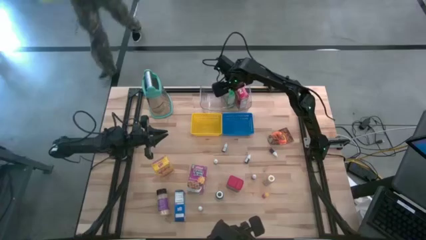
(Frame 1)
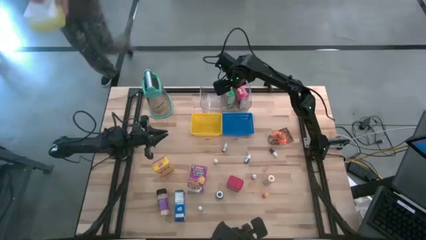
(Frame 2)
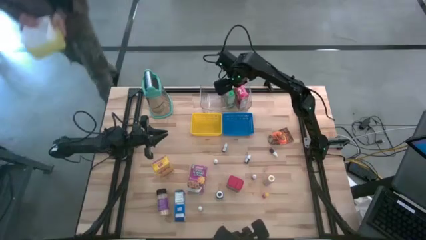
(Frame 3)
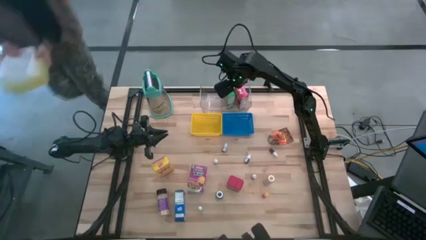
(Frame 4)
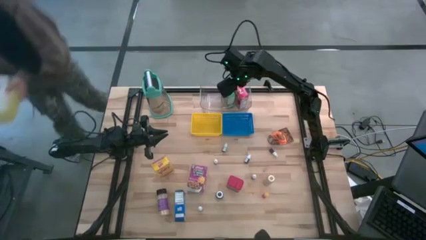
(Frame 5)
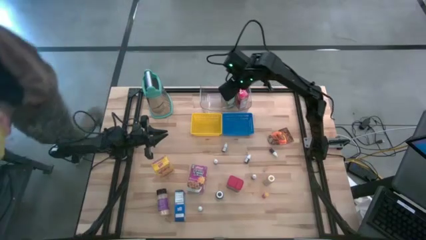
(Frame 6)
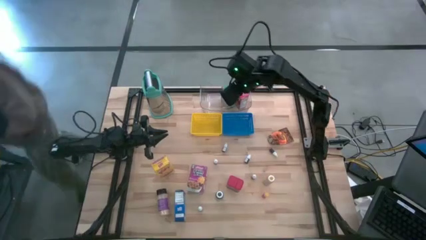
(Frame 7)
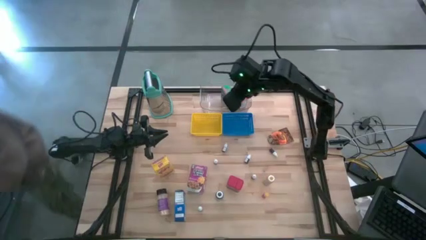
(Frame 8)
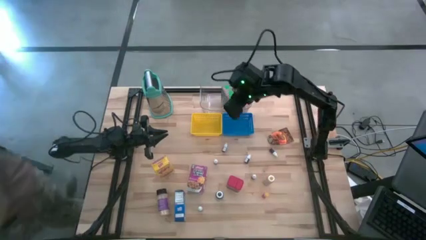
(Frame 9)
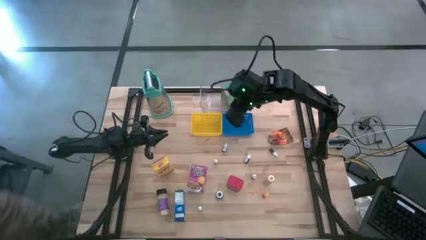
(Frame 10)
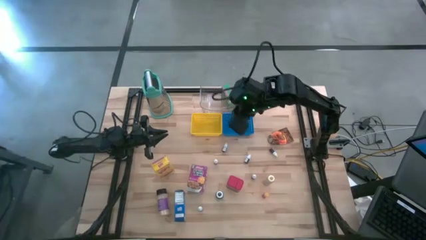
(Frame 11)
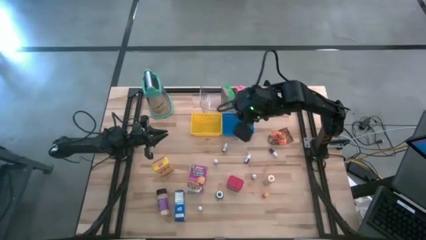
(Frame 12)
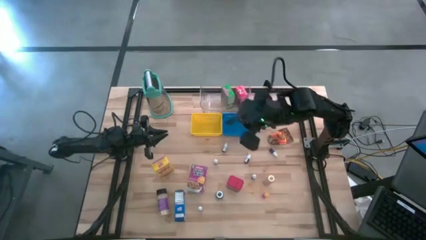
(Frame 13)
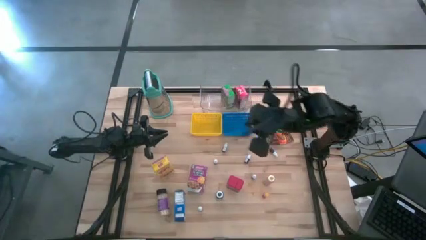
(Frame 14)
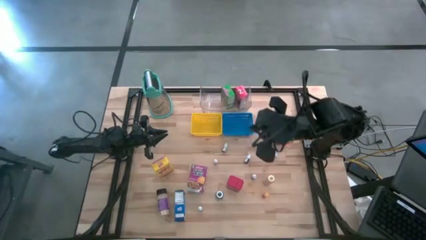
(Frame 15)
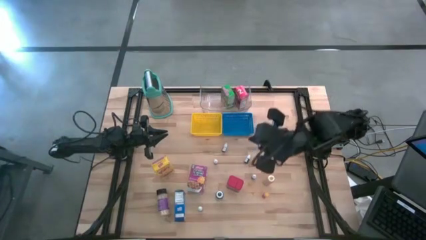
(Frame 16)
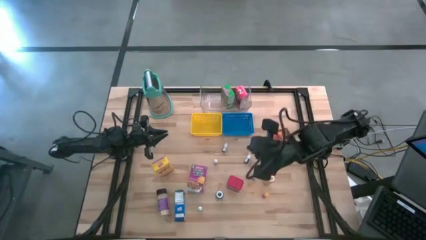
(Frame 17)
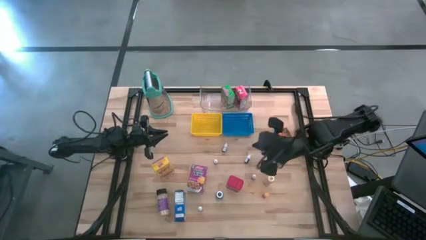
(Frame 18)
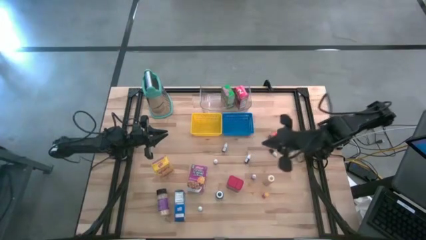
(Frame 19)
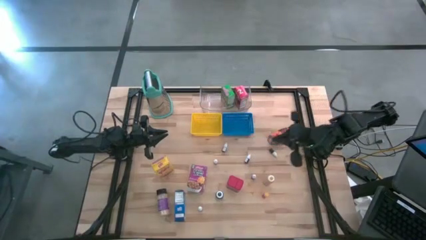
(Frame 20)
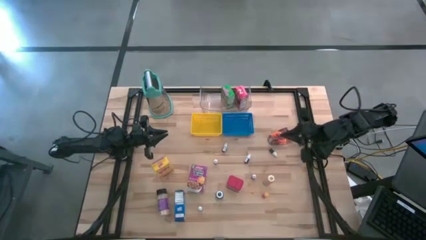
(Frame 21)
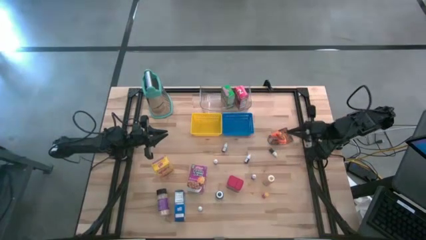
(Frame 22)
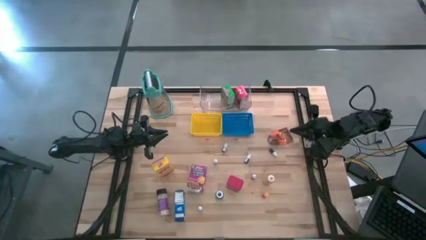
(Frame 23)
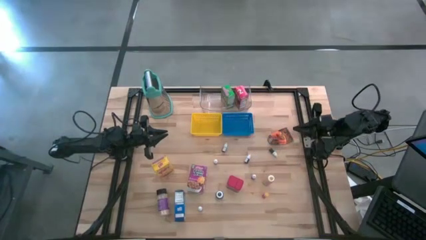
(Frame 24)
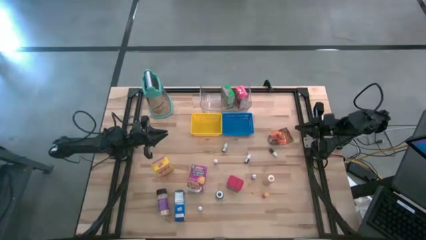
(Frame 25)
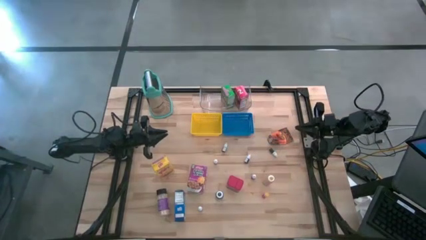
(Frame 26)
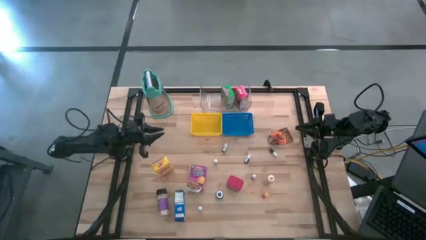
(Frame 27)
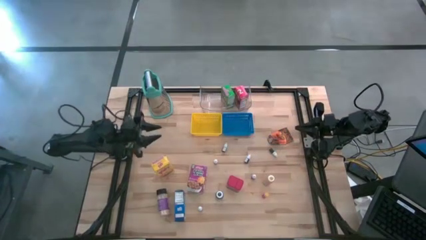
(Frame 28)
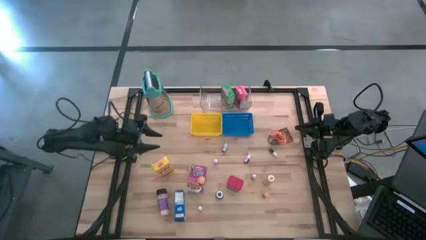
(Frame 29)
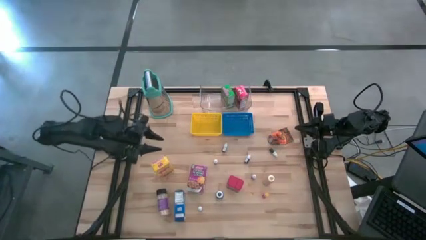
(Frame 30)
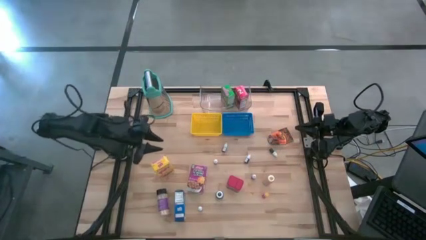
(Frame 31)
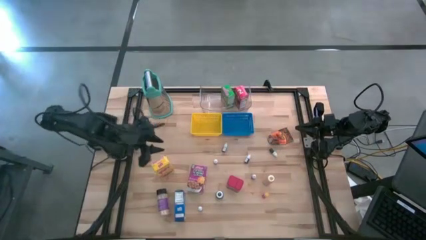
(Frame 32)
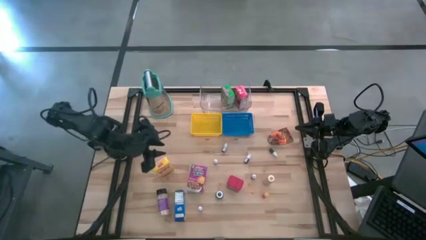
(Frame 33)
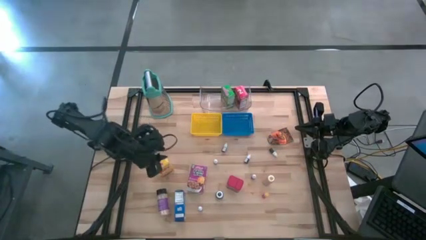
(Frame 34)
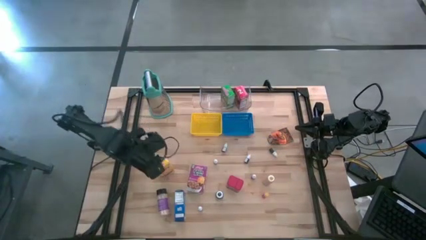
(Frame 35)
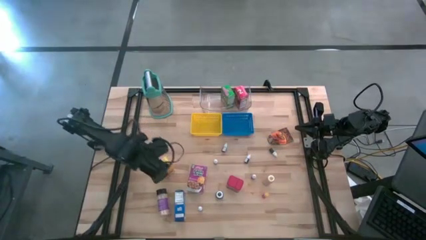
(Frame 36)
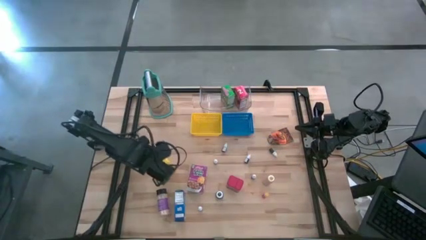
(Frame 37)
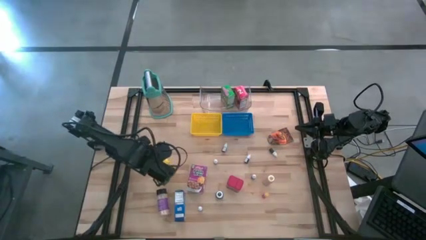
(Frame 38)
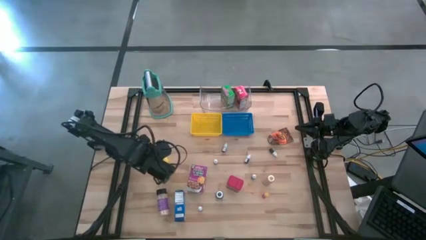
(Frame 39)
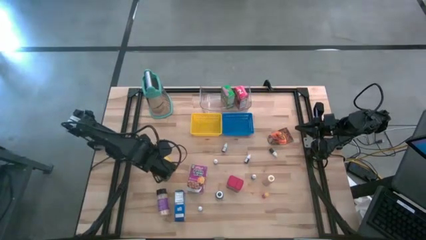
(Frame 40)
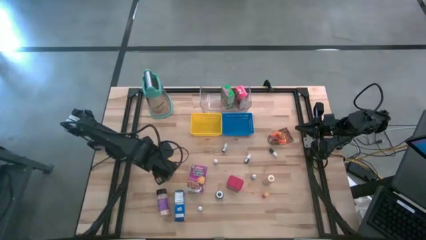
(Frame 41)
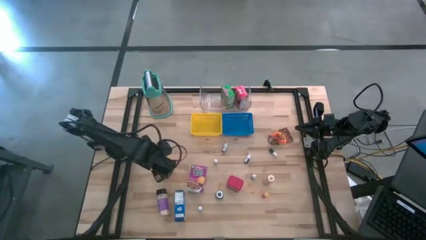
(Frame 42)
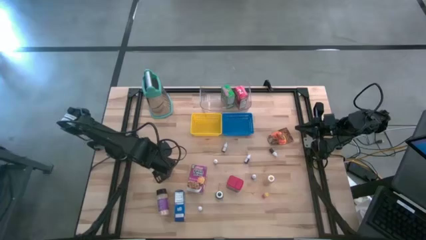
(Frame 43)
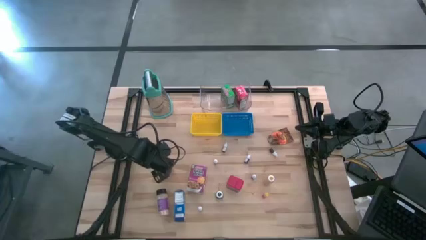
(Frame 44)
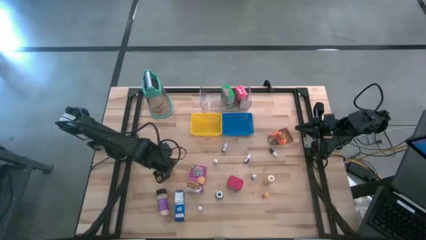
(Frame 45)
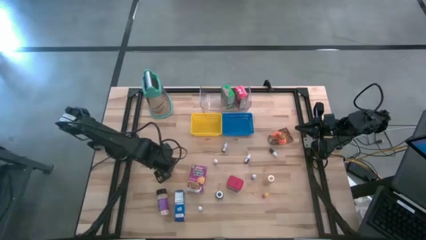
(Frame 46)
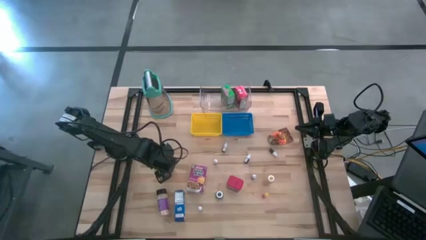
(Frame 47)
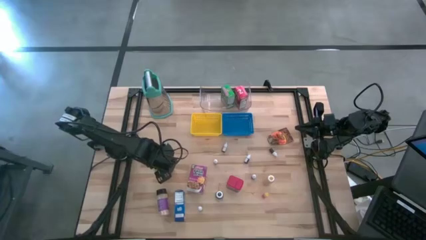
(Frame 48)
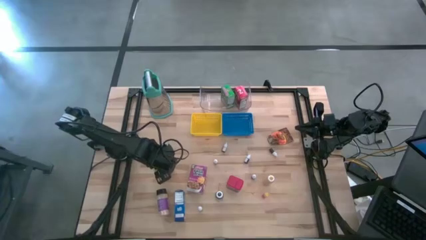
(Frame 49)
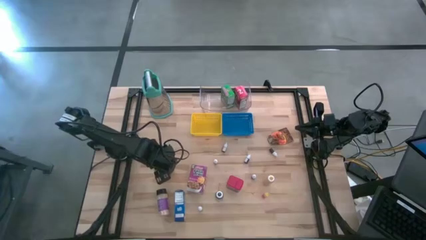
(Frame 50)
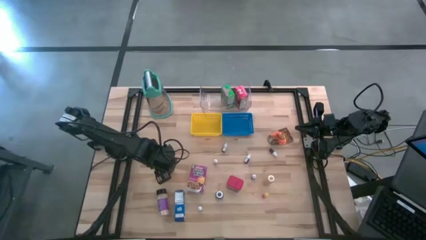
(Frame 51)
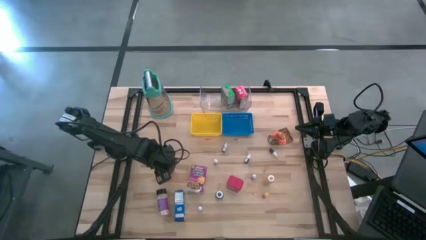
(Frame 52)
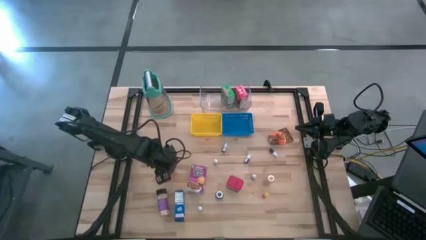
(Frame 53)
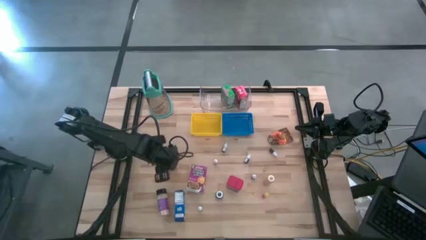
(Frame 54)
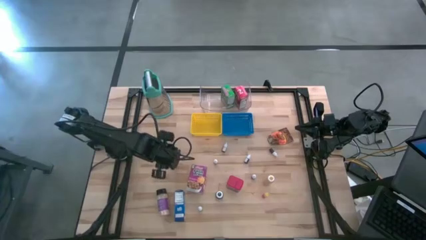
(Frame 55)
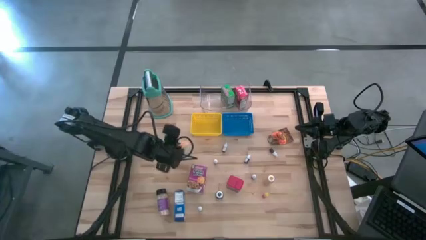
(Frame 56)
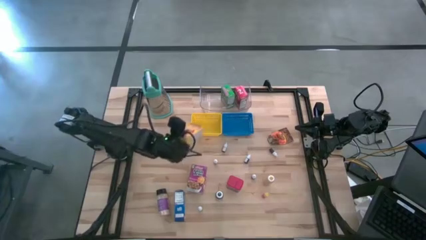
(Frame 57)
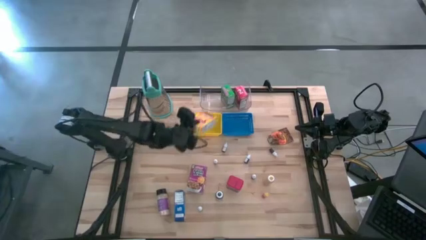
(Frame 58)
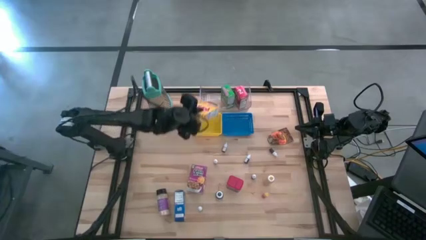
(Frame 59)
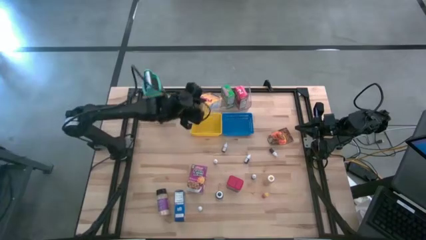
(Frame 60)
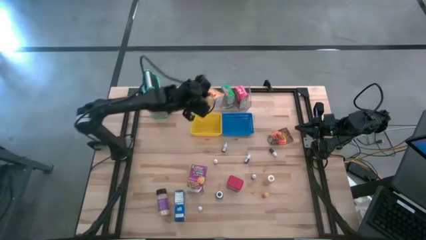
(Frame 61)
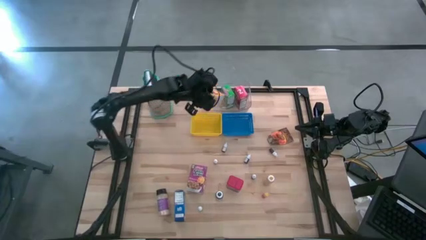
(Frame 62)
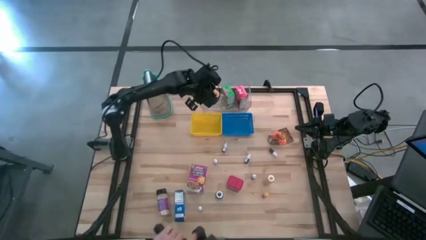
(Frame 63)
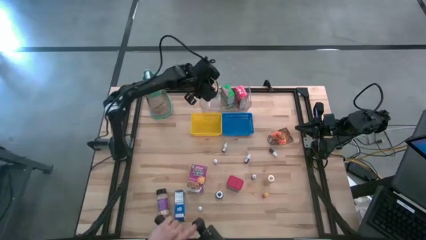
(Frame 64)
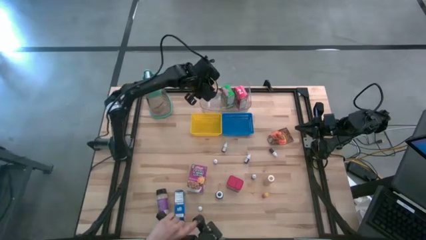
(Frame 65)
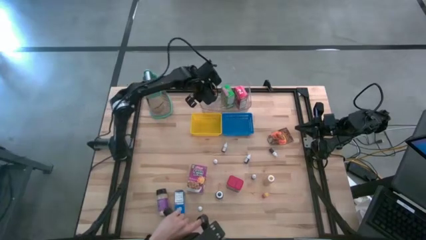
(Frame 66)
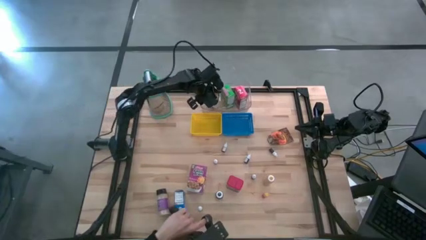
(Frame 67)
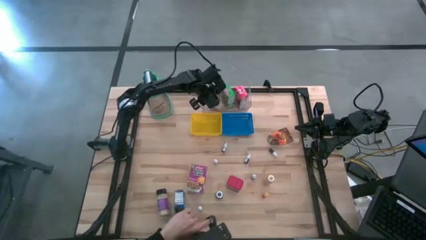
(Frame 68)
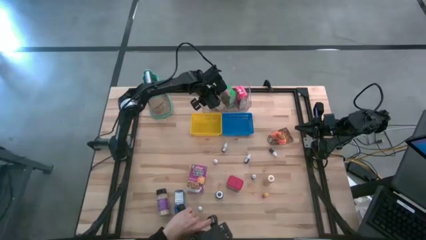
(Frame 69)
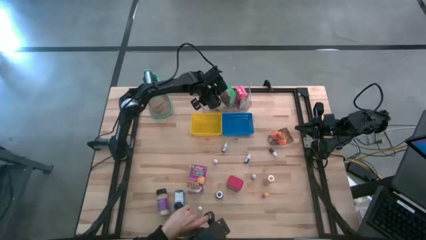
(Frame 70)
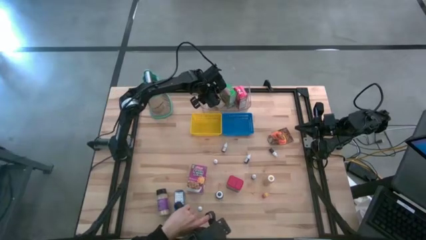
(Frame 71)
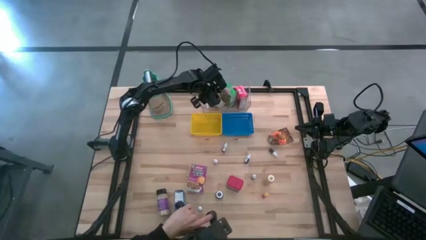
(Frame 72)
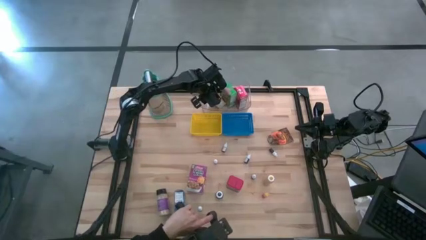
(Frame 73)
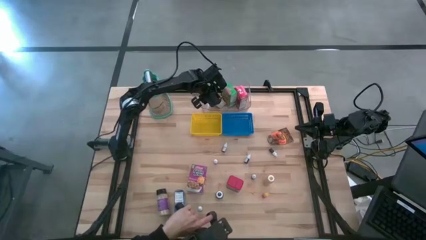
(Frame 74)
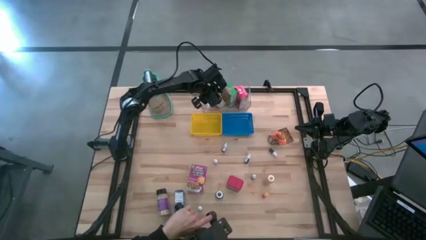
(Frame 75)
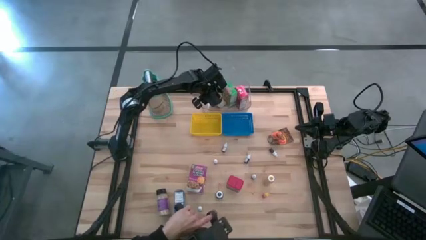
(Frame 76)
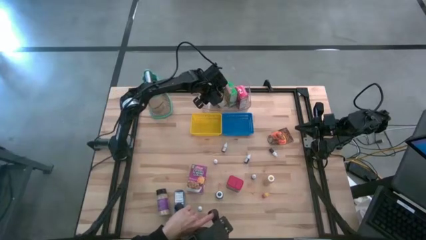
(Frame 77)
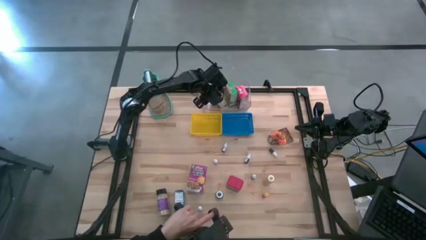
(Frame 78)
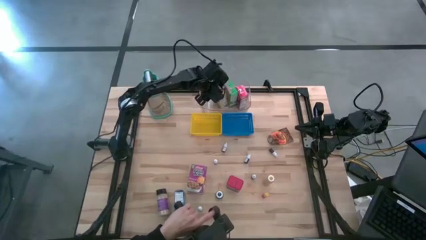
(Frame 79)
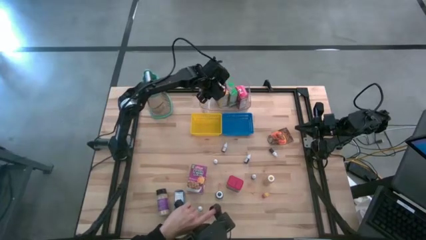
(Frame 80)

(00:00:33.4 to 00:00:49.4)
Task: Pick & Place Kitchen Items
Put the yellow cereal box into the transparent bin
